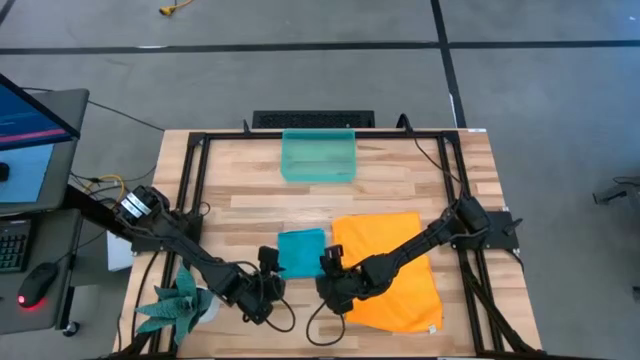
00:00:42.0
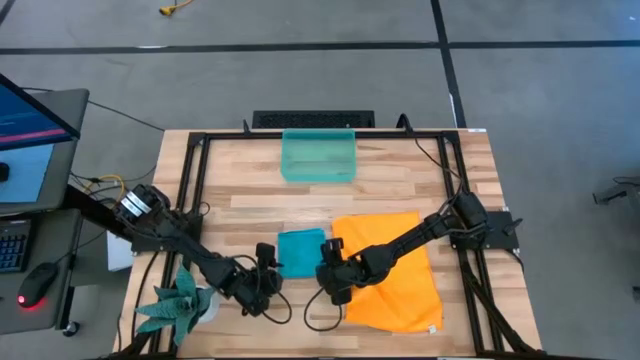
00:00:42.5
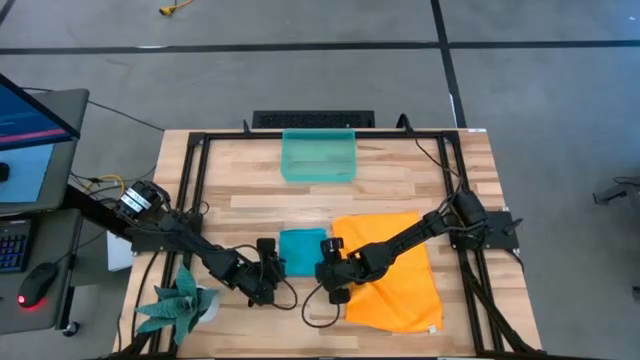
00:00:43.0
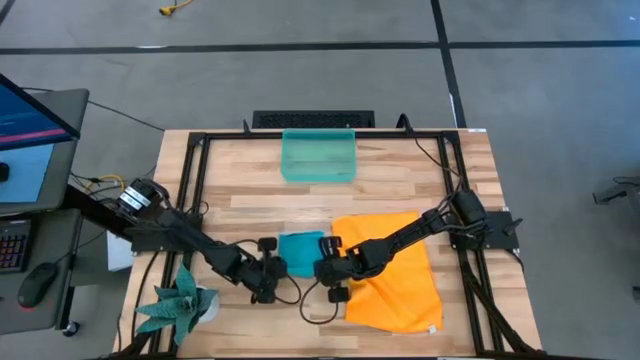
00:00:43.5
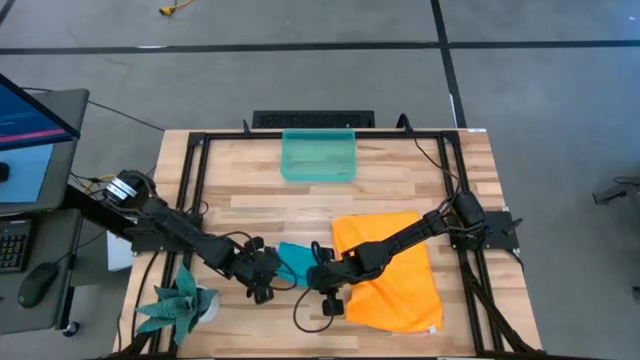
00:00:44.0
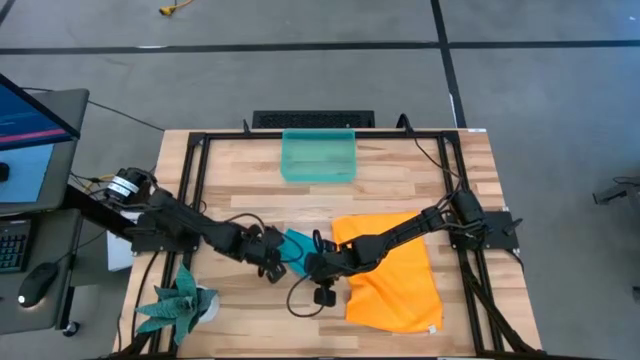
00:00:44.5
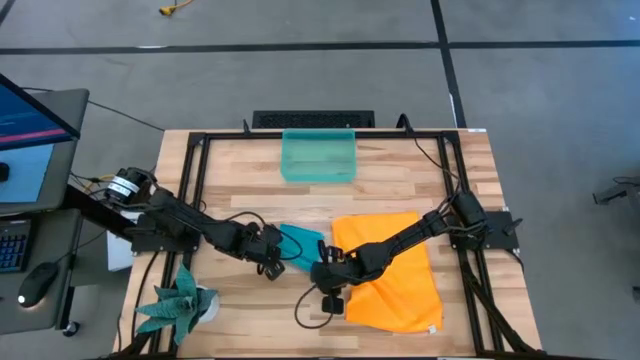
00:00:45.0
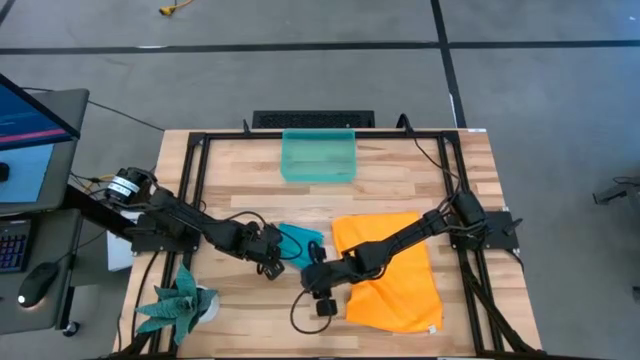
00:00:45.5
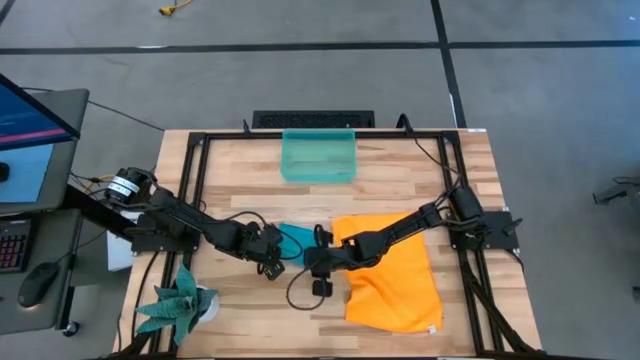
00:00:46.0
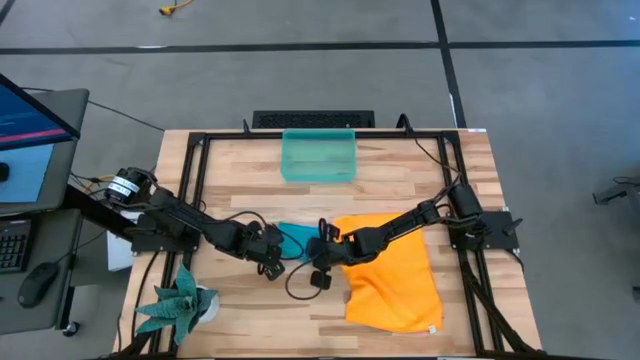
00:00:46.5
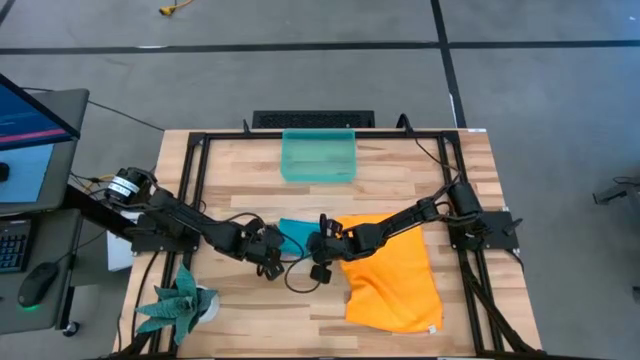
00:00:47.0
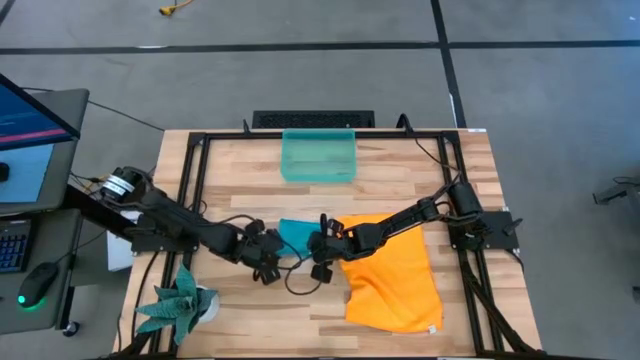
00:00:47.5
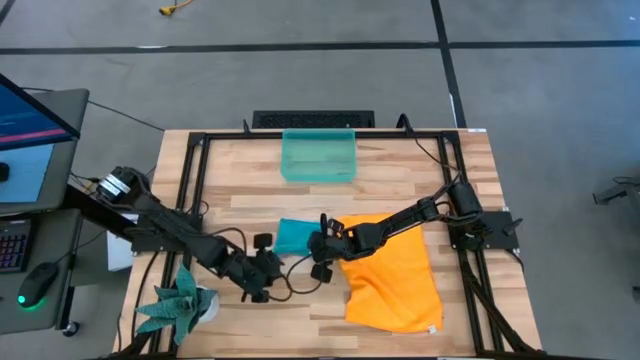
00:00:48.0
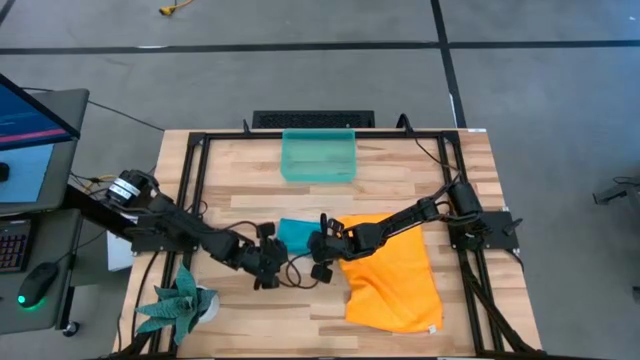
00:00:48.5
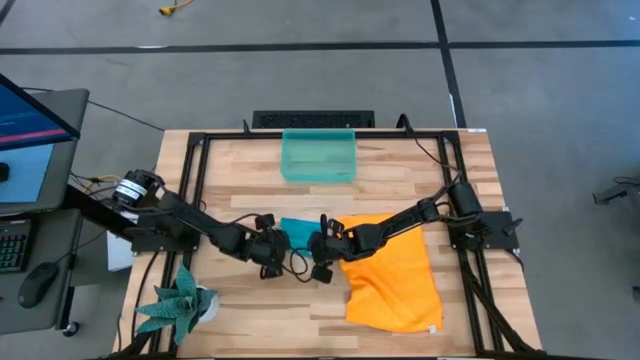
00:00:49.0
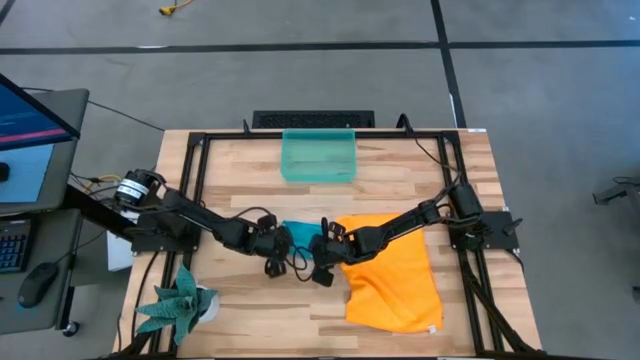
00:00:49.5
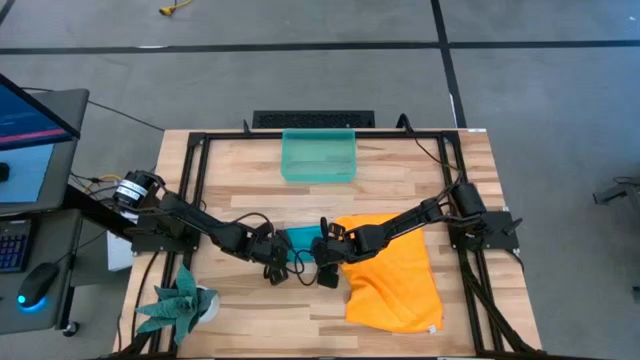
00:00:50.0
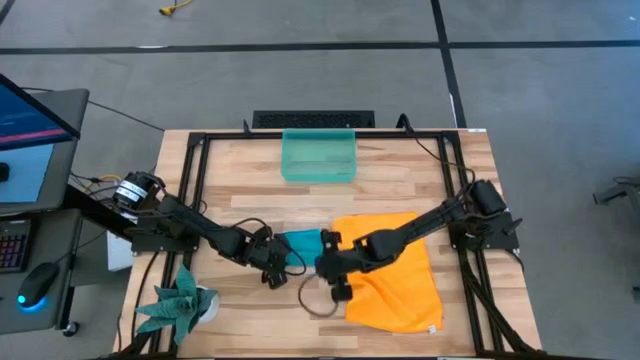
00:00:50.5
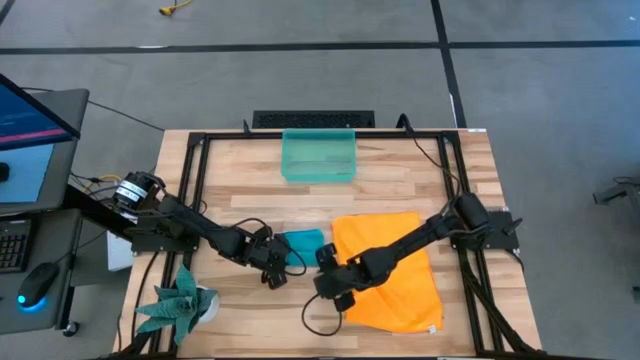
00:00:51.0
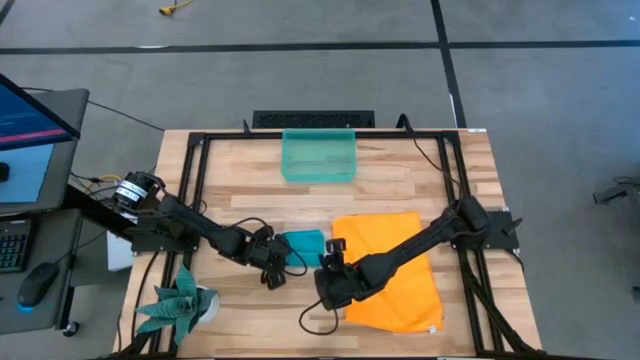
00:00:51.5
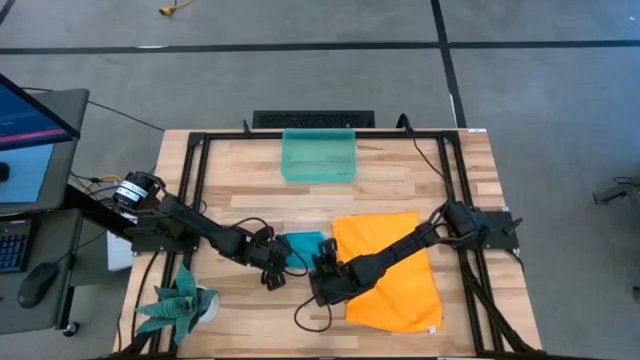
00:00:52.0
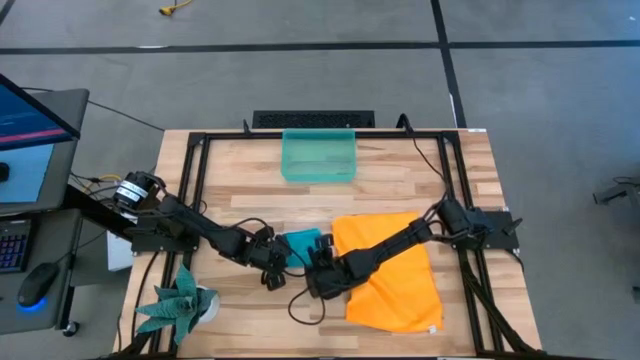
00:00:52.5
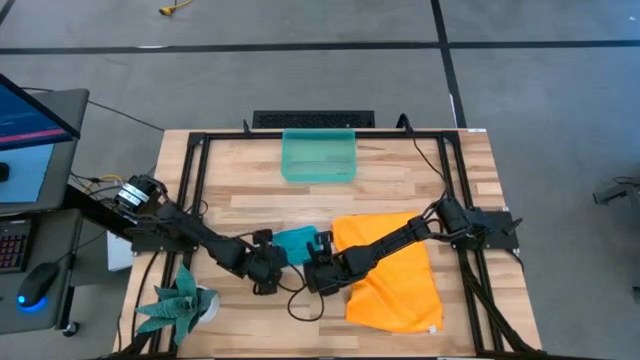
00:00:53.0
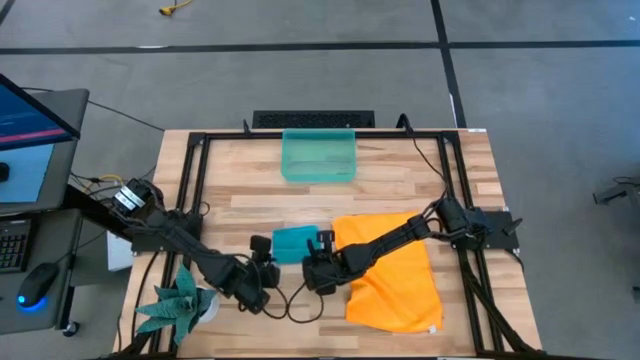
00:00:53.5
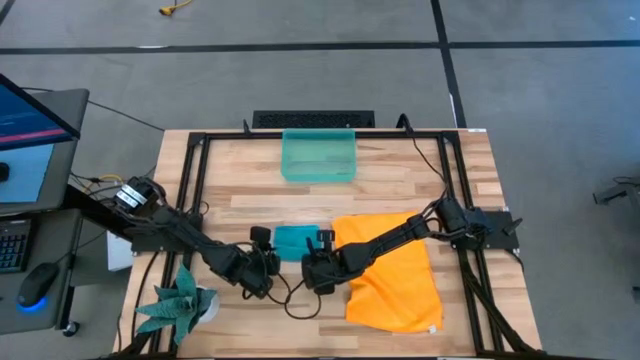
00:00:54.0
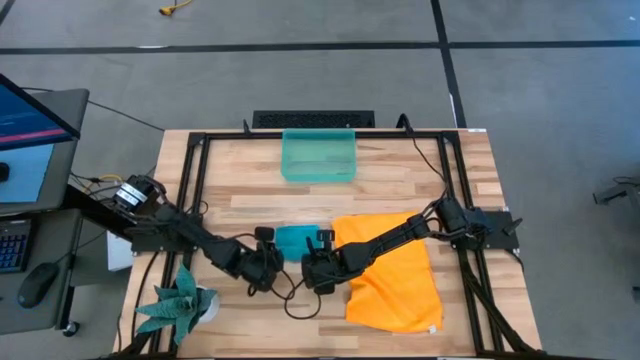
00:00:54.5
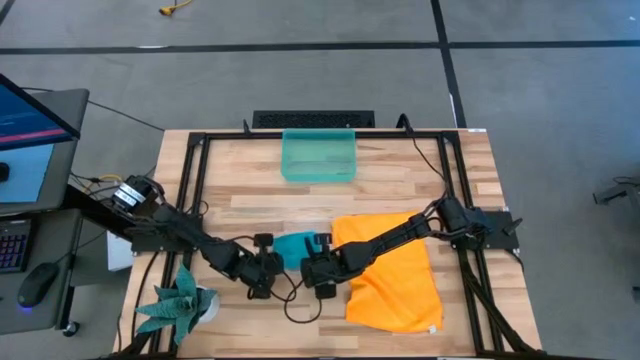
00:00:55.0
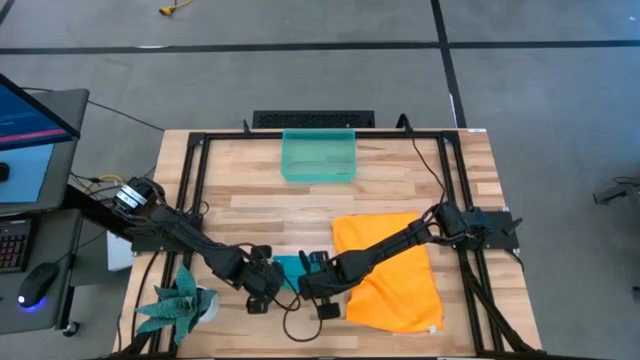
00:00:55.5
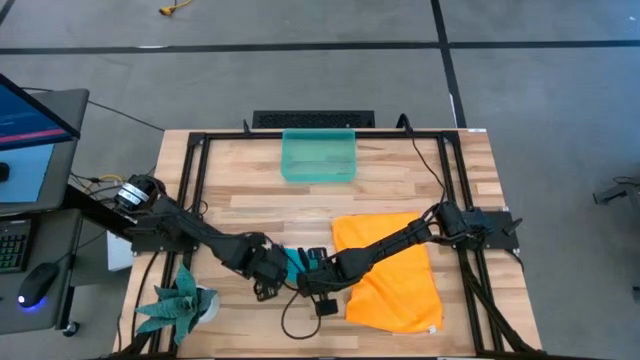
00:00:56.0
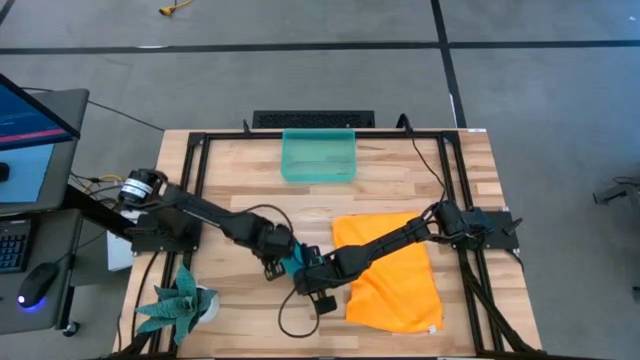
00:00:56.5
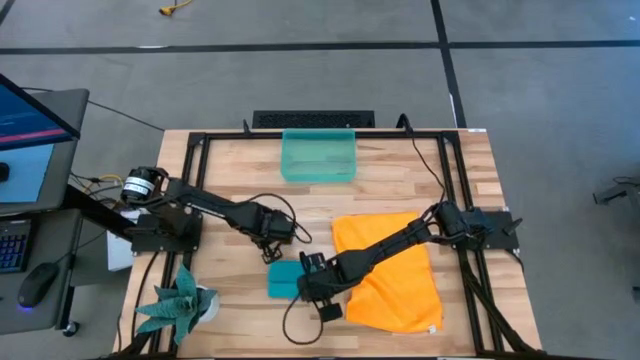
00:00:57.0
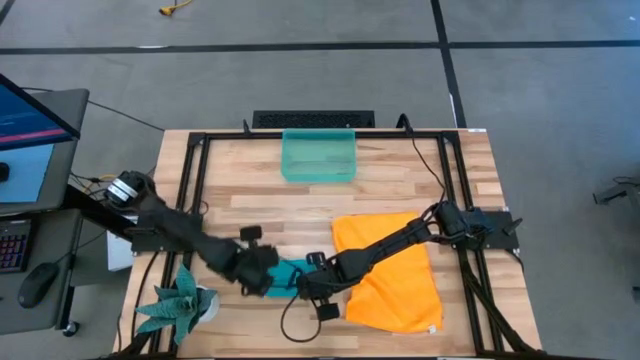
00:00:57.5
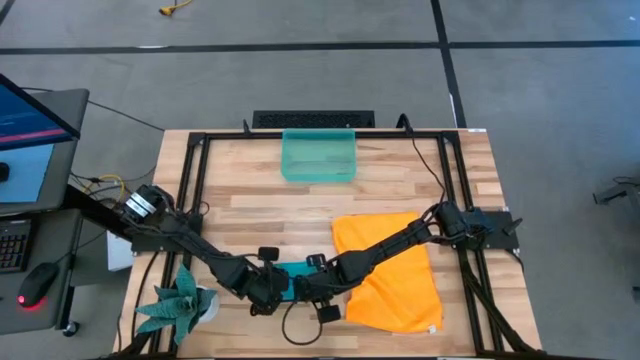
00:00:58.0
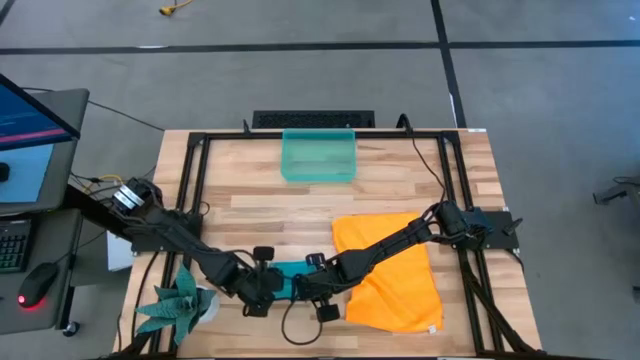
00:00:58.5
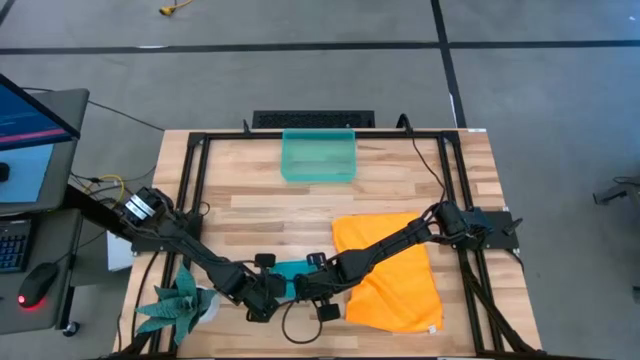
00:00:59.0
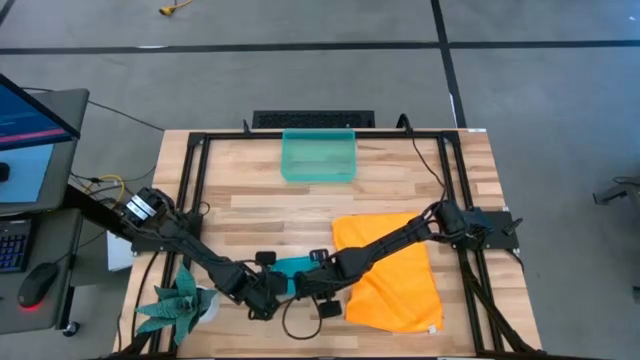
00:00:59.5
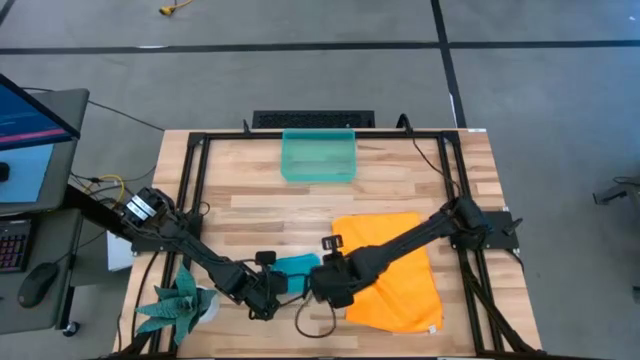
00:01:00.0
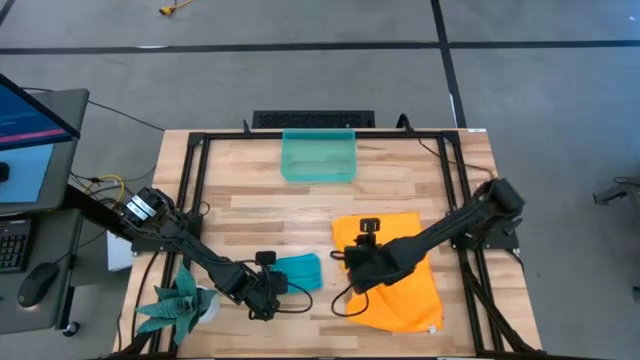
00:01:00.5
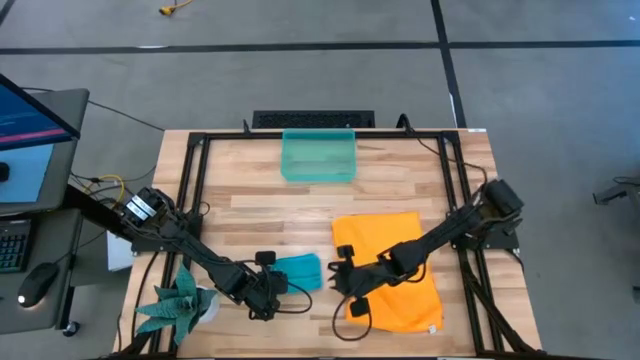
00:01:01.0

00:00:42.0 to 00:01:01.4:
Task: Roll microfiber towels into tight, uniform cylinder then place into a basket
Roll the blue microfiber cloth
